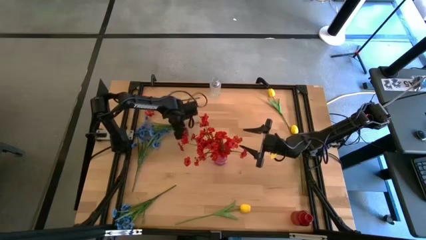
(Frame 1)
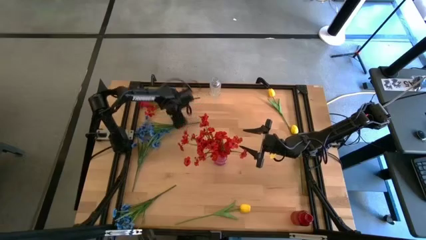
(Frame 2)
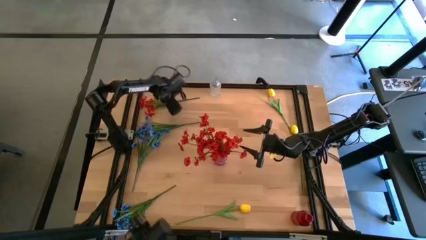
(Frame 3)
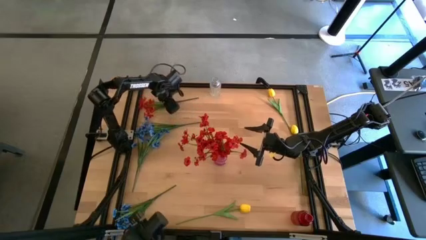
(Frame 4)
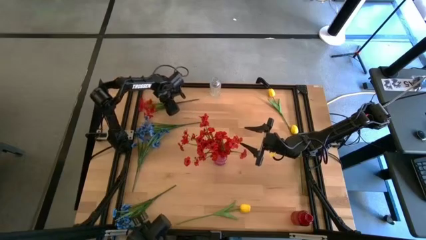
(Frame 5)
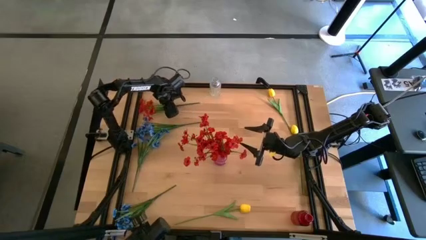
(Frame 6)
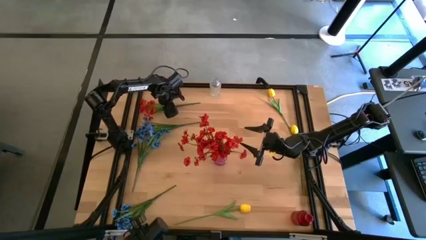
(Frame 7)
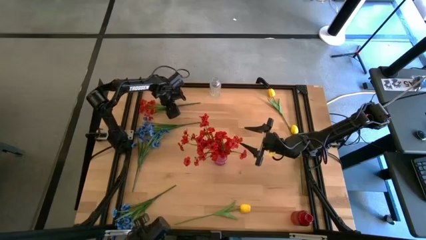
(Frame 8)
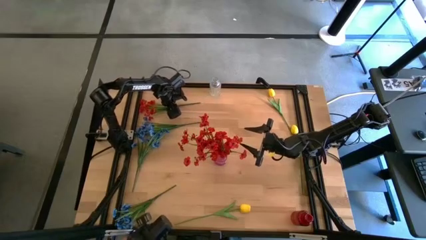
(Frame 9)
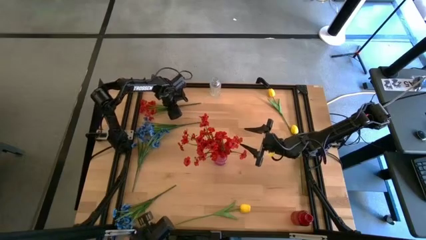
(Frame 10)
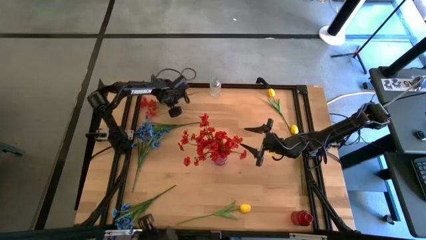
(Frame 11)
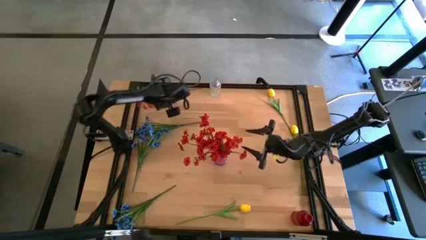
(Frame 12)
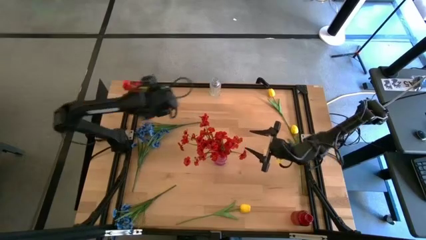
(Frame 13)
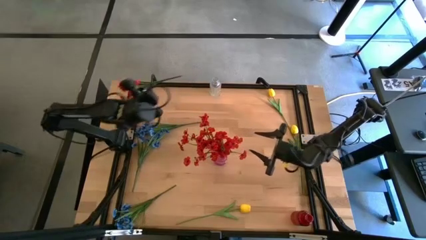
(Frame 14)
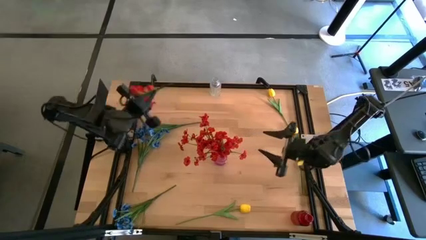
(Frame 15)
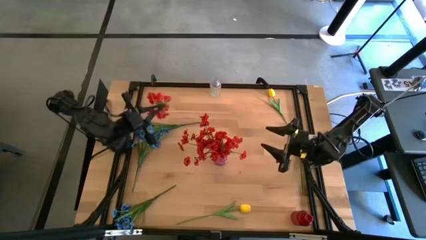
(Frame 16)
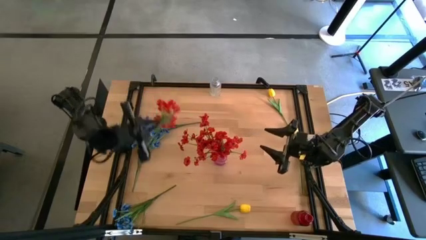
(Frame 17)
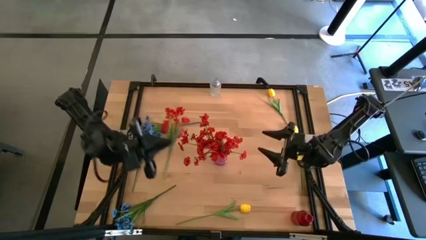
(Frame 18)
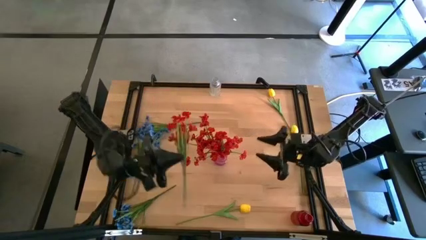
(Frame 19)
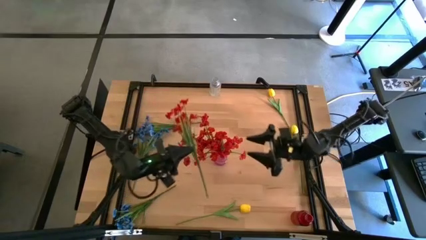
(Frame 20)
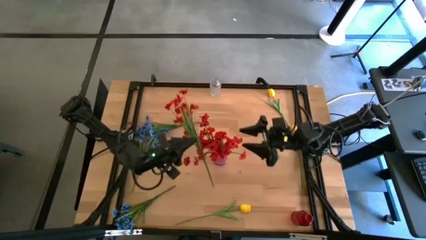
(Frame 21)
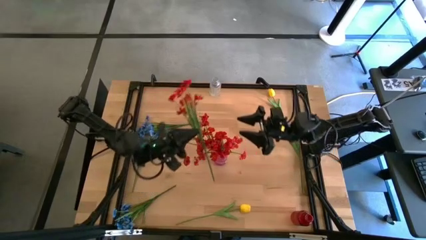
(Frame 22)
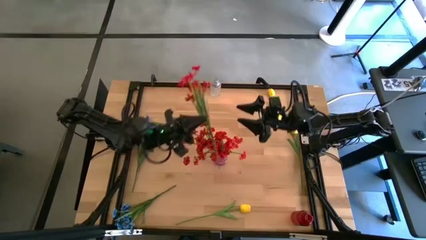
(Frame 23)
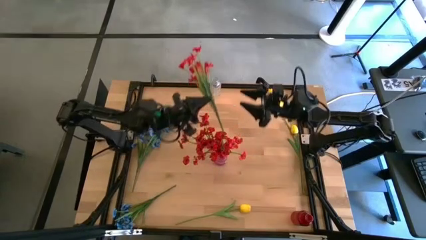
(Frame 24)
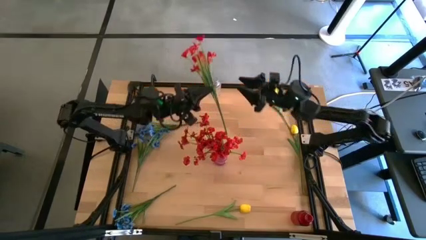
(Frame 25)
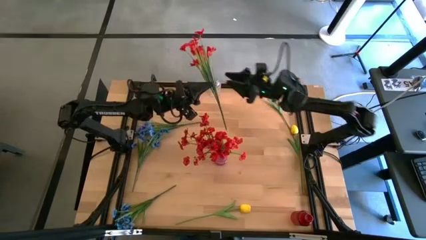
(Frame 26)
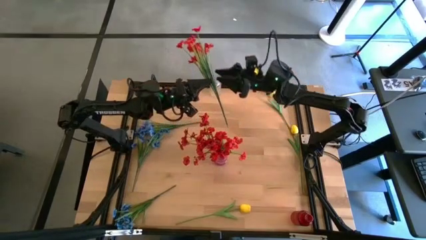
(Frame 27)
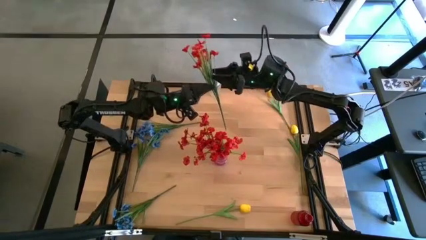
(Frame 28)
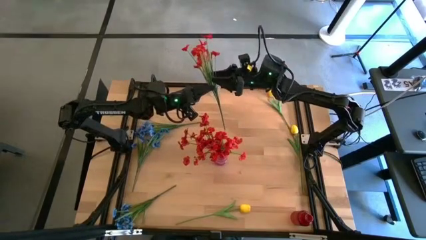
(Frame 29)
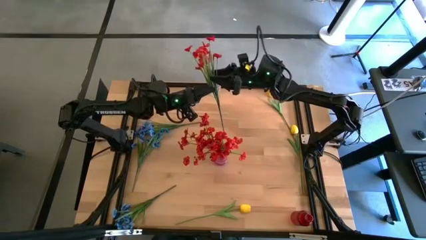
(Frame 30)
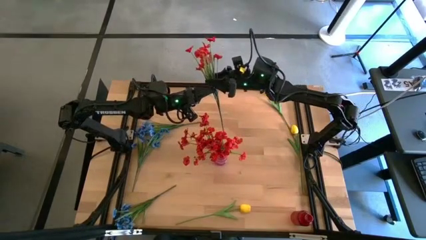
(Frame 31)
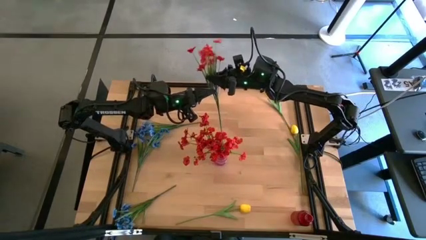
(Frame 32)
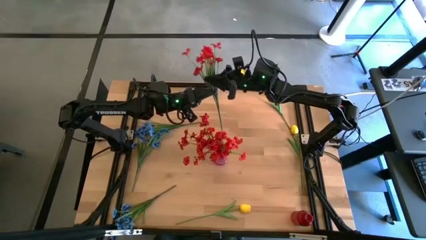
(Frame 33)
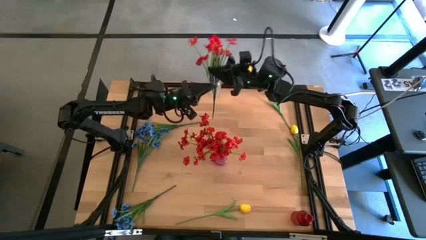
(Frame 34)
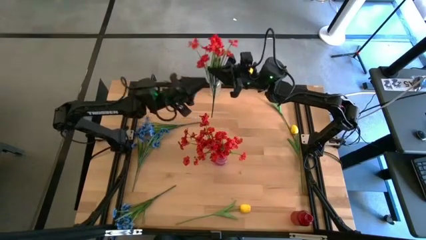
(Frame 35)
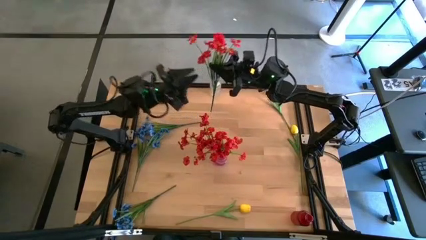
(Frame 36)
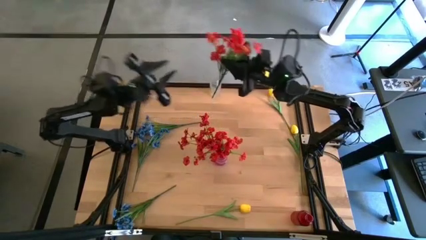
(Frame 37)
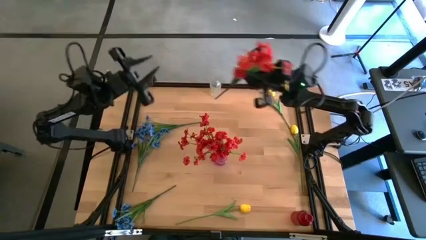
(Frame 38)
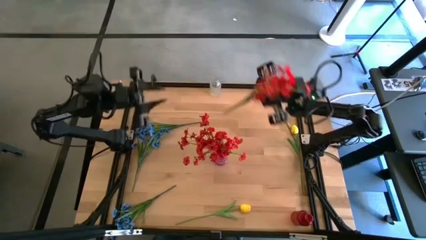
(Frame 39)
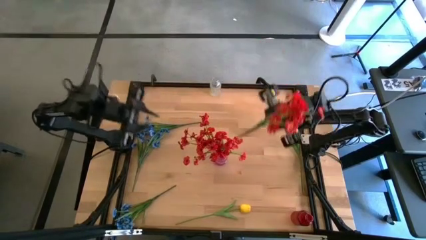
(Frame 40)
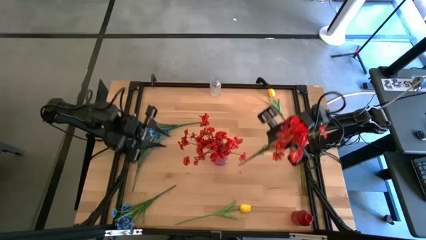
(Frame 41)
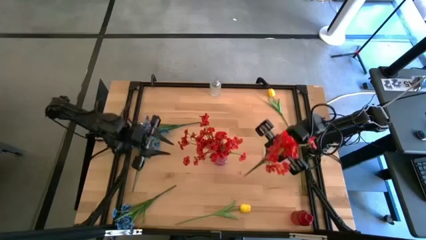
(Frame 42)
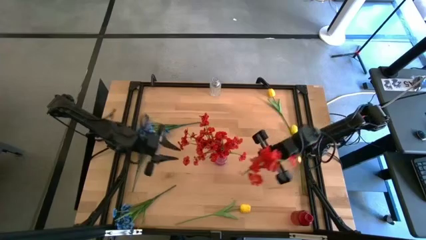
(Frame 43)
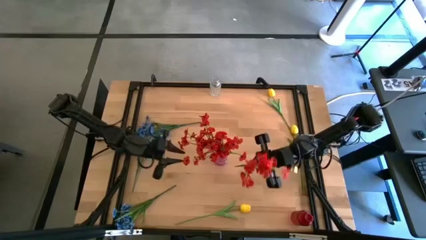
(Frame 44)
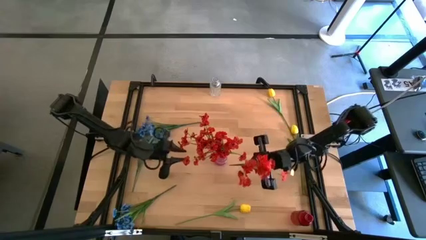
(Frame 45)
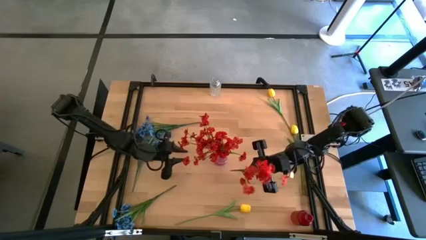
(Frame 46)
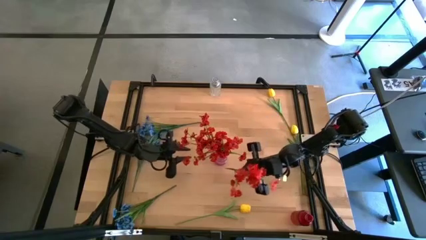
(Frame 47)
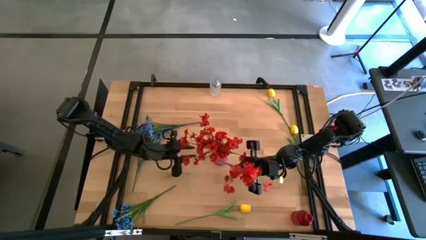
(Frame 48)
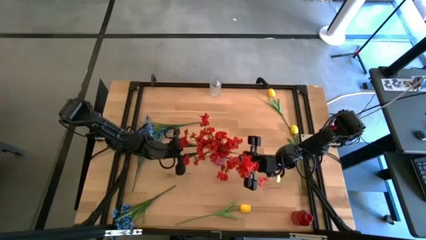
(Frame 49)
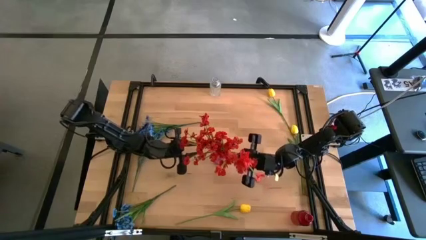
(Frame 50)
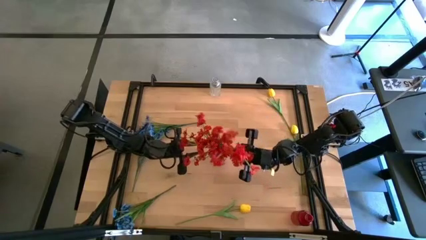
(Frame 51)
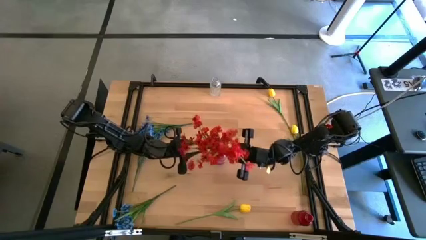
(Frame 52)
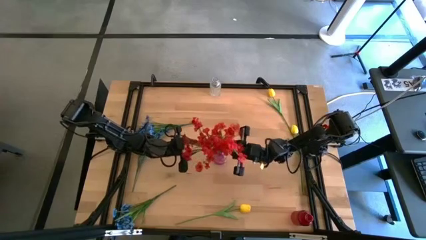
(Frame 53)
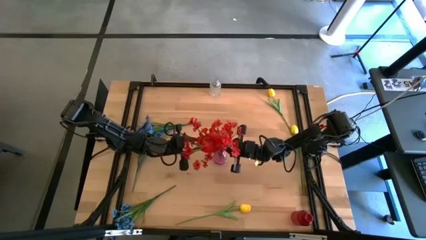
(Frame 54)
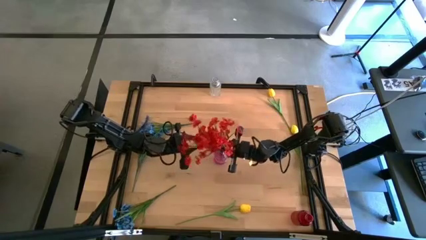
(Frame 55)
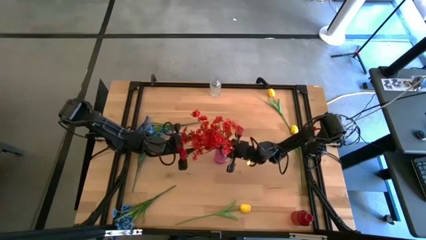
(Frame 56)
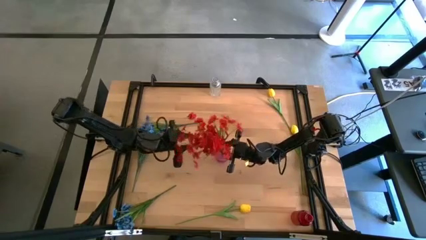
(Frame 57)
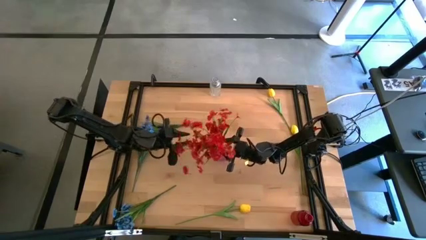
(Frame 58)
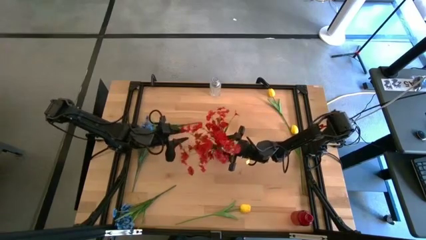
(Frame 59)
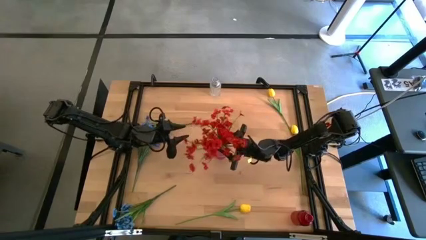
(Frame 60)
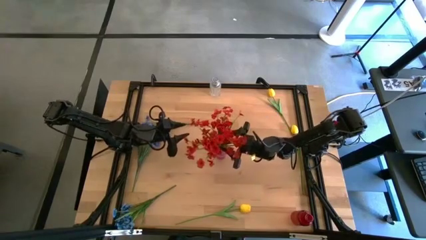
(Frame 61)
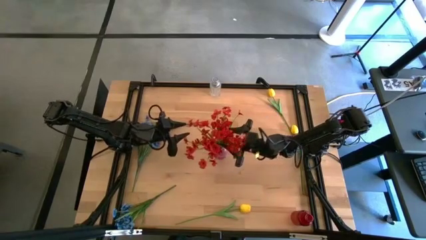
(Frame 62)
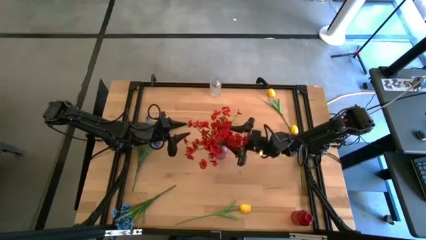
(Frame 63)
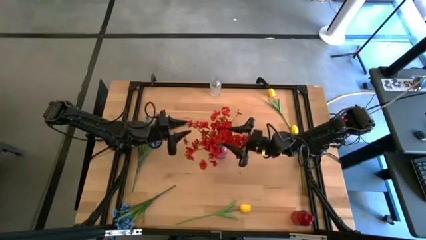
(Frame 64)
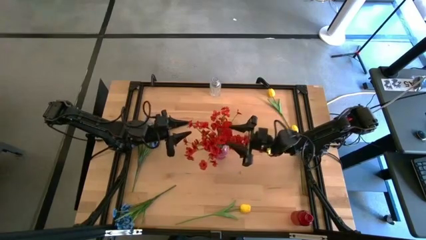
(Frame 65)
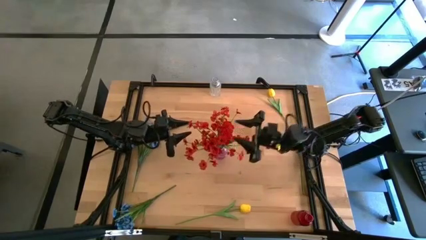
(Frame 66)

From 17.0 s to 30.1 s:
Task: Sort flowers into vase by color
Put the red flowers into the purple vase

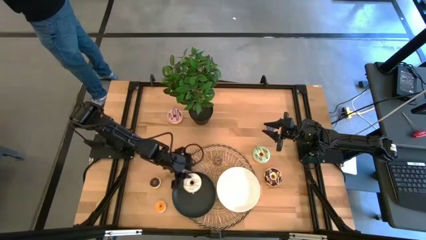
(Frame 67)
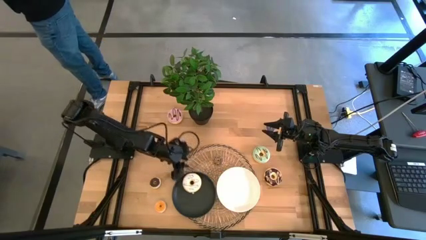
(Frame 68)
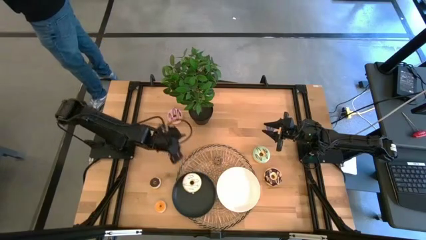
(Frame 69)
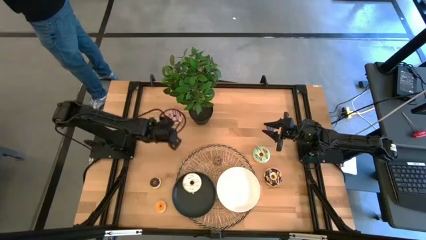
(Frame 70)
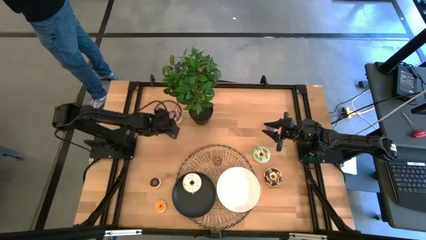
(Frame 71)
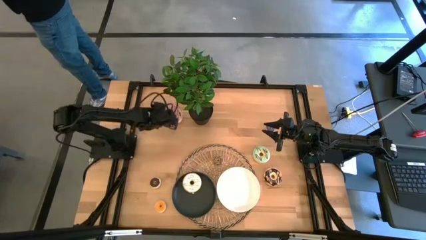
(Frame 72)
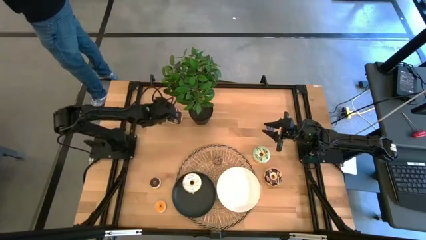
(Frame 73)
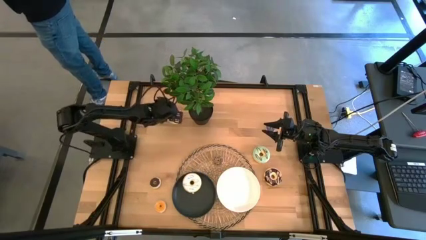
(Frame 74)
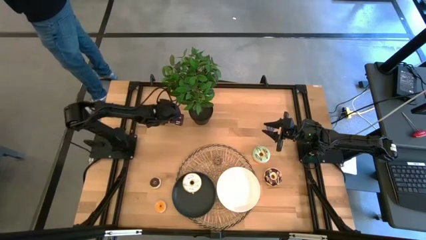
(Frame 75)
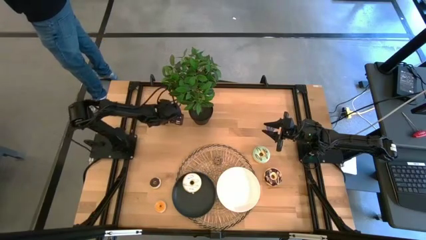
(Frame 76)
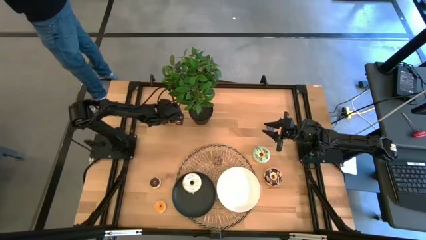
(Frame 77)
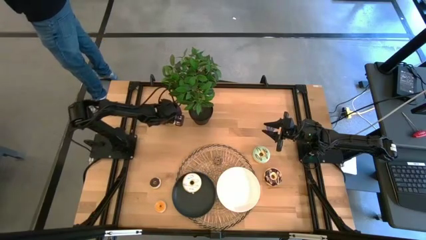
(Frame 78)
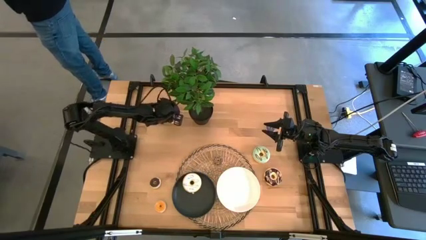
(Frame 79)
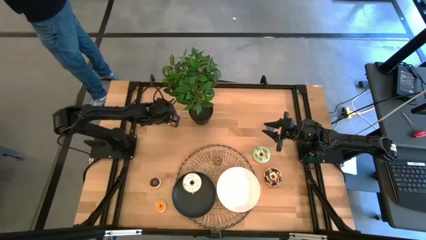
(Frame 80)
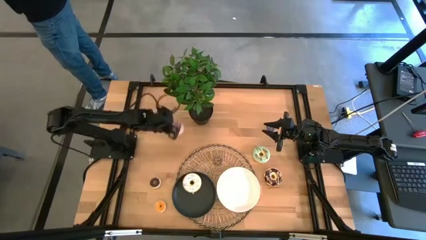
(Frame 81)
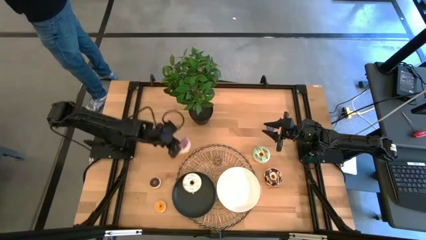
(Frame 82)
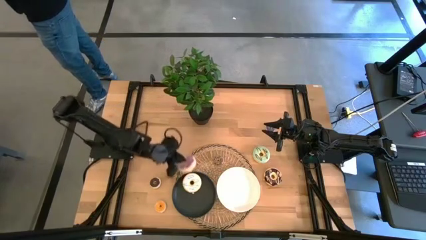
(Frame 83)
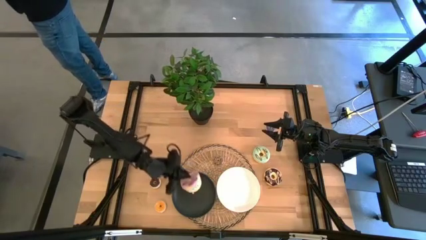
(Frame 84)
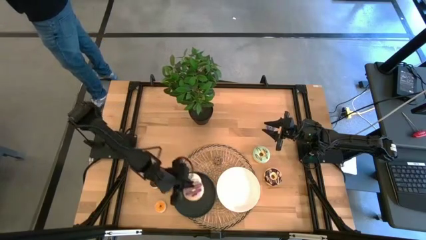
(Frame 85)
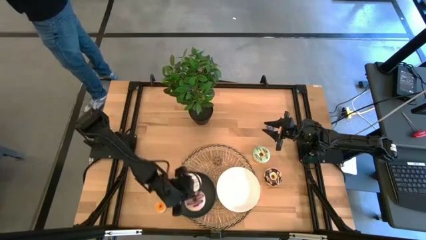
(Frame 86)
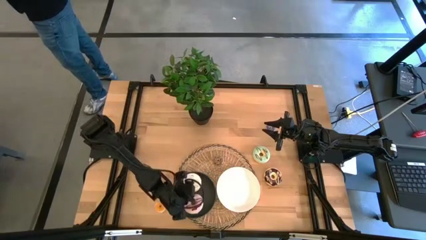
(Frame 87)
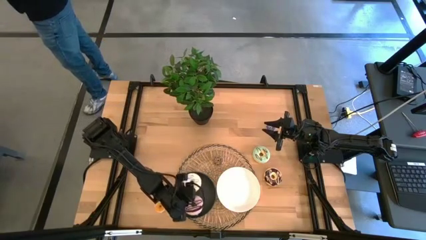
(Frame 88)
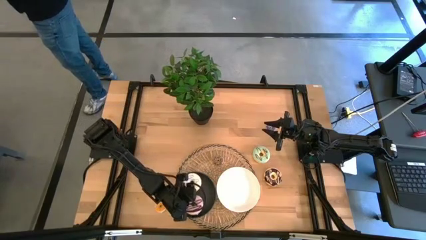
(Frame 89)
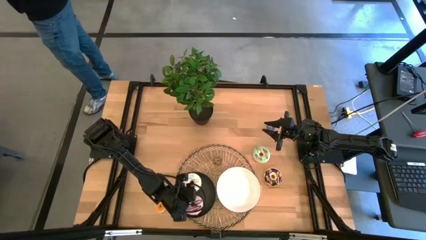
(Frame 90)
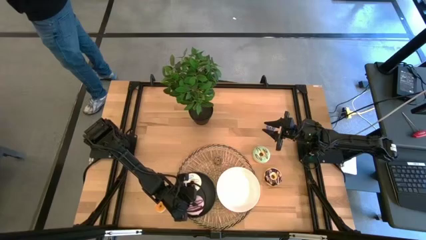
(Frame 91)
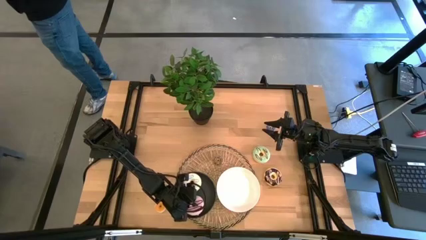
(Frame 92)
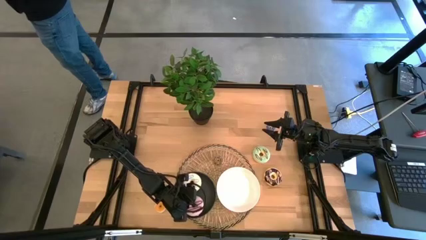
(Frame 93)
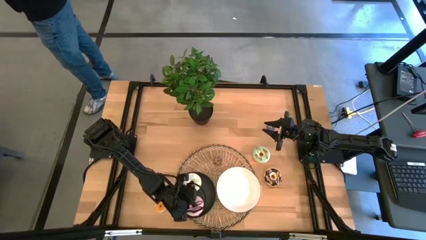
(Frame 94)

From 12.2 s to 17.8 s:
Task: Pick & Place donuts
Put the large purple donut on the black plate
